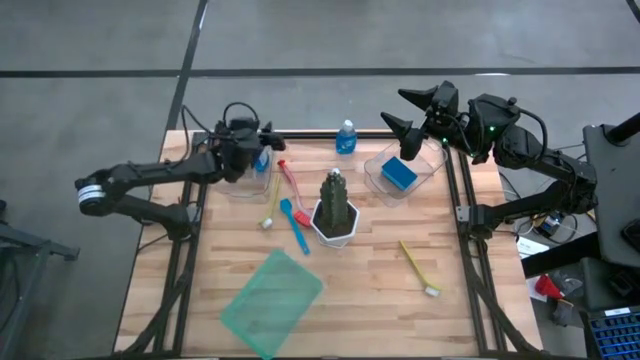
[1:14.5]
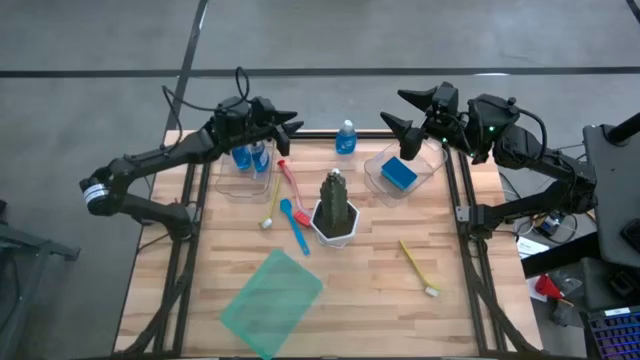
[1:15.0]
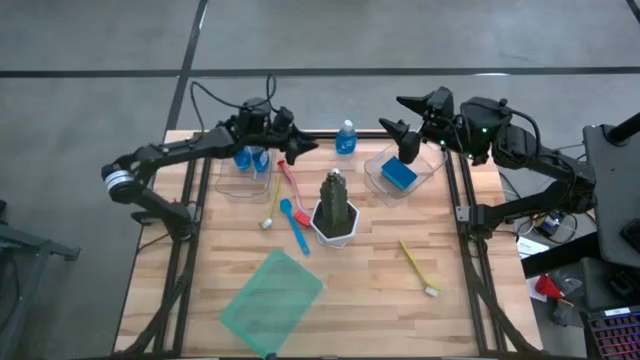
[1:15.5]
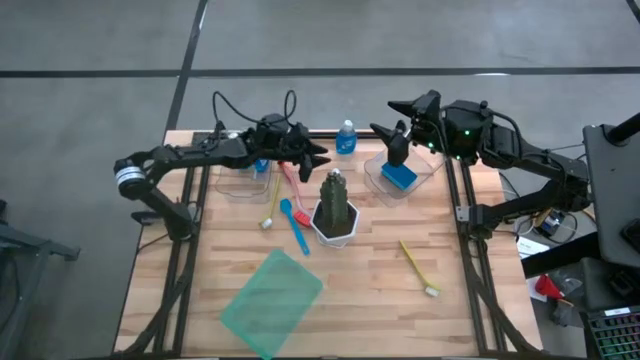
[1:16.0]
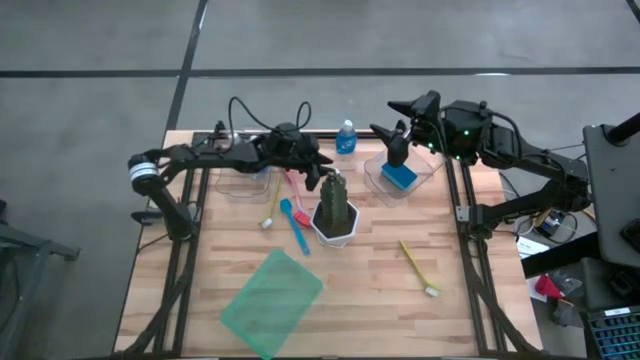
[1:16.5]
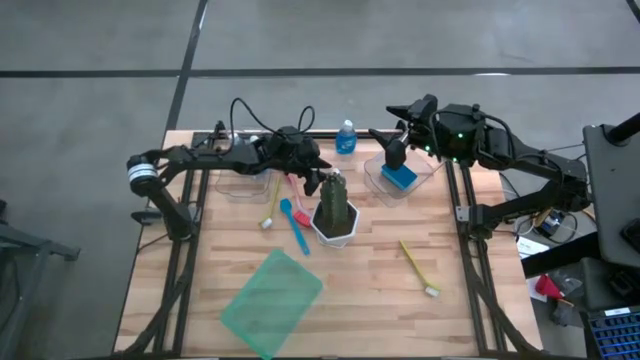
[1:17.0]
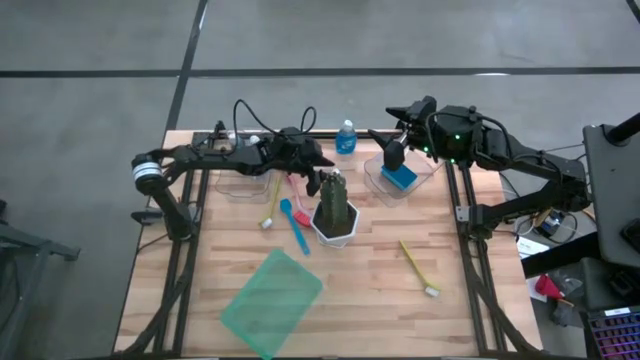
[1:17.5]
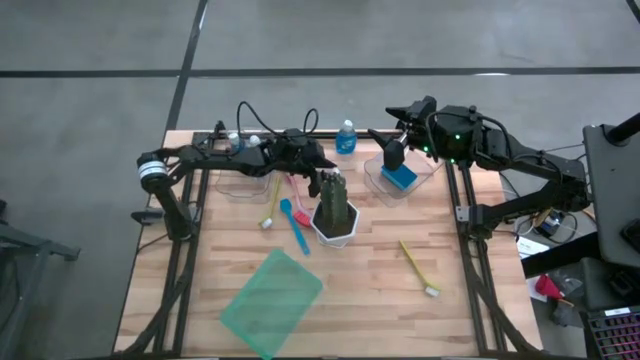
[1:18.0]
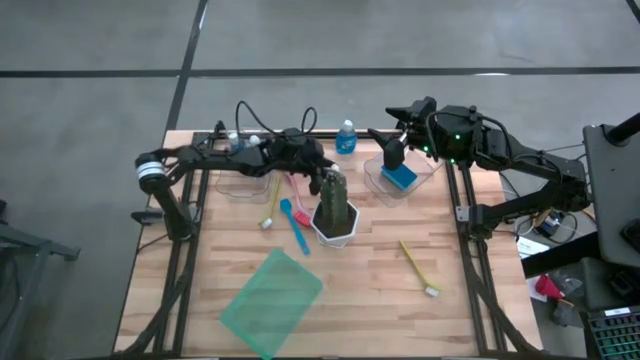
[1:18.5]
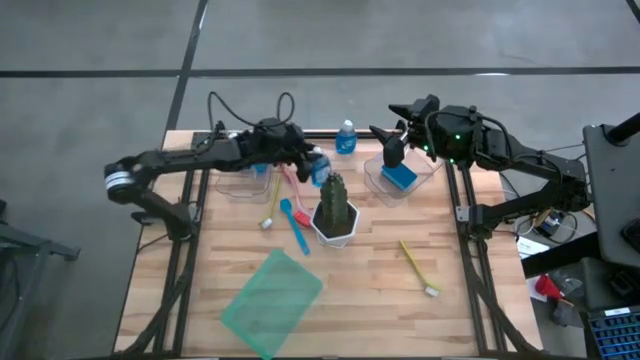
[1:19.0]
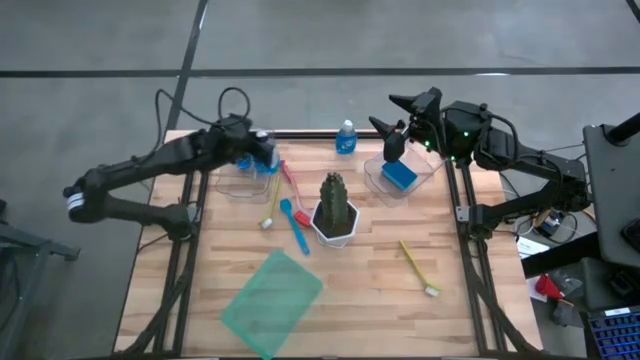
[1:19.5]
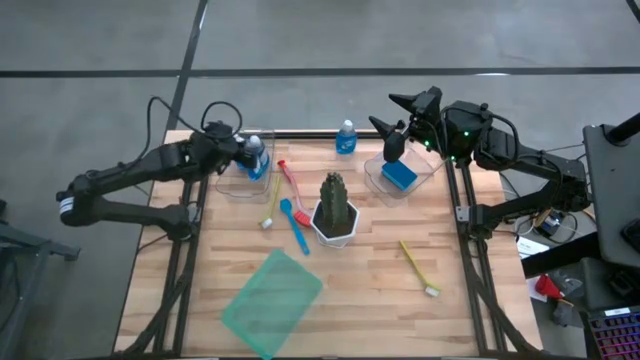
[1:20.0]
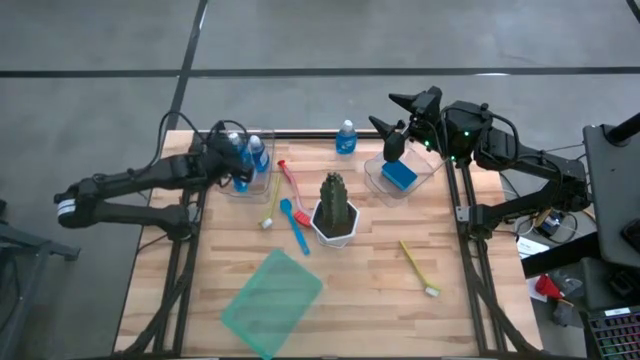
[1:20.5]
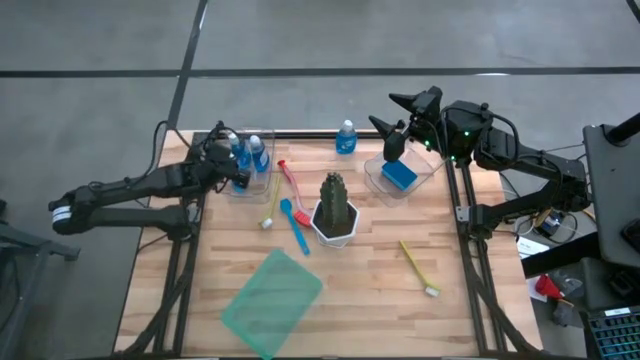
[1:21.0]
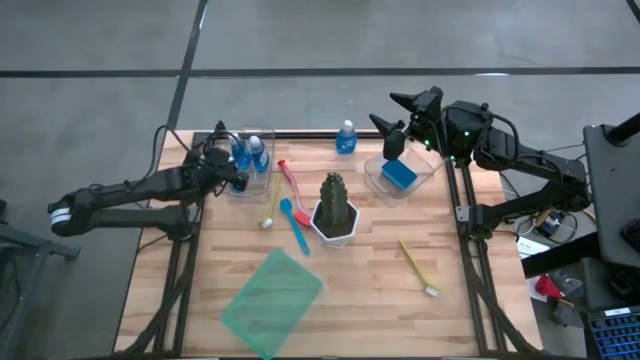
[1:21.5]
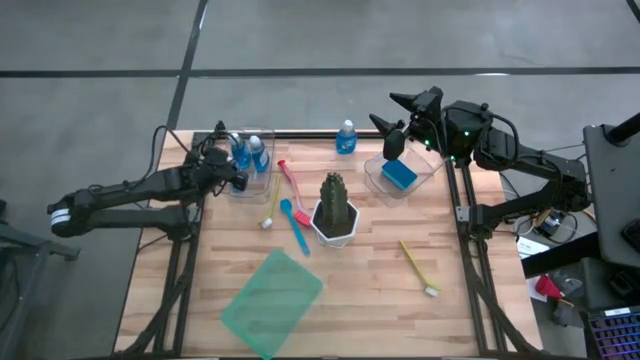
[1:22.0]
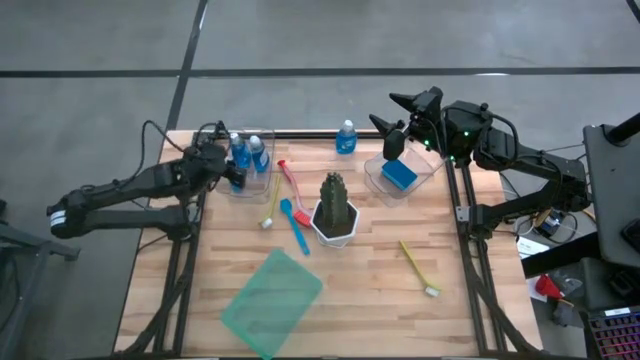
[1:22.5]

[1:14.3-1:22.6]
Task: Pick & Place Kitchen Sink Supplies
Put the blue liquid detergent into the left transparent bin

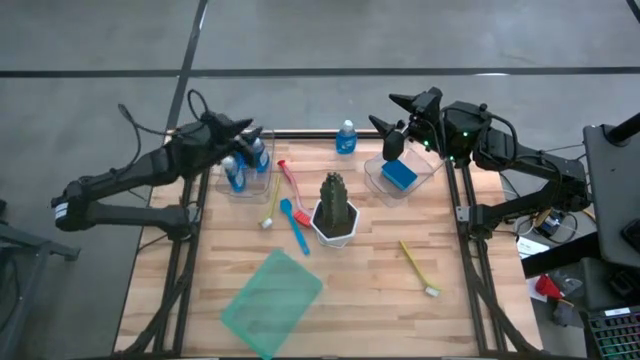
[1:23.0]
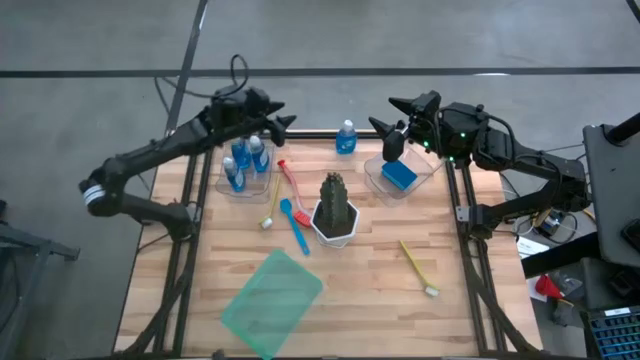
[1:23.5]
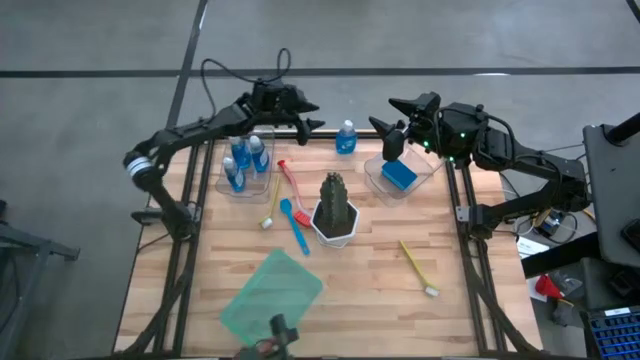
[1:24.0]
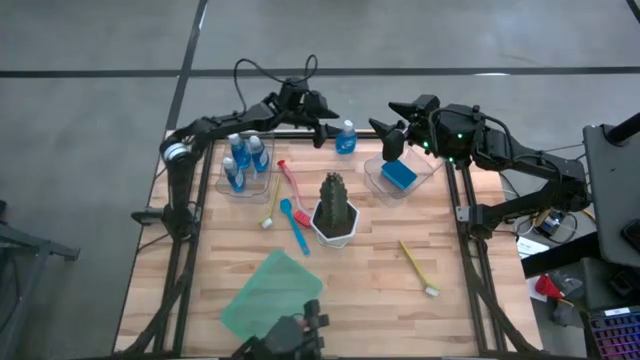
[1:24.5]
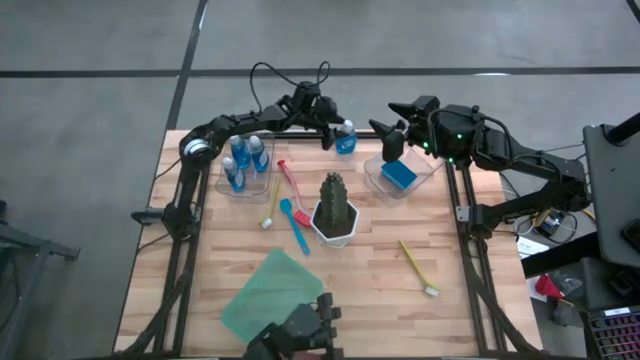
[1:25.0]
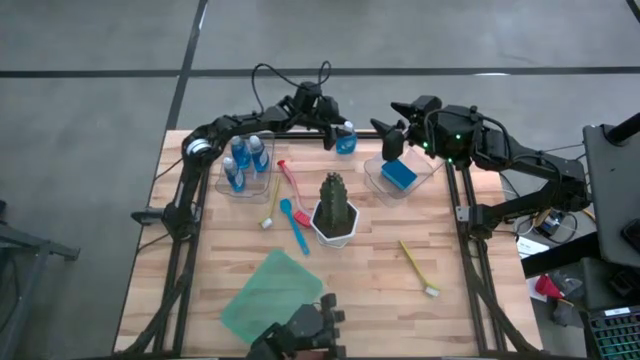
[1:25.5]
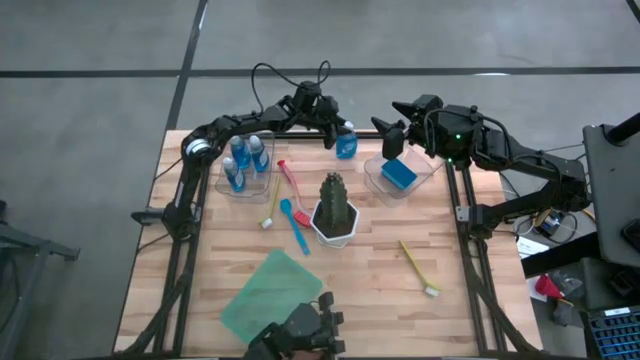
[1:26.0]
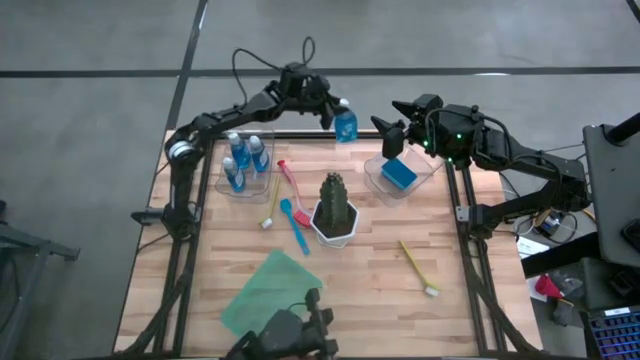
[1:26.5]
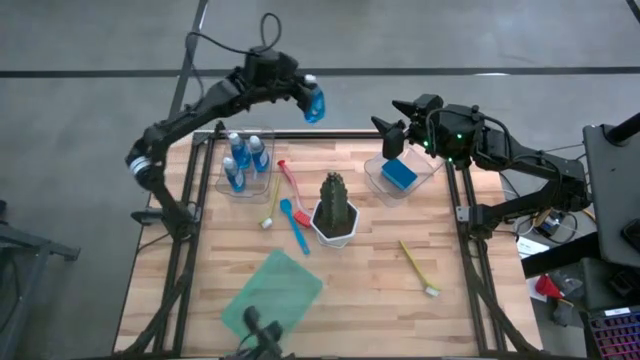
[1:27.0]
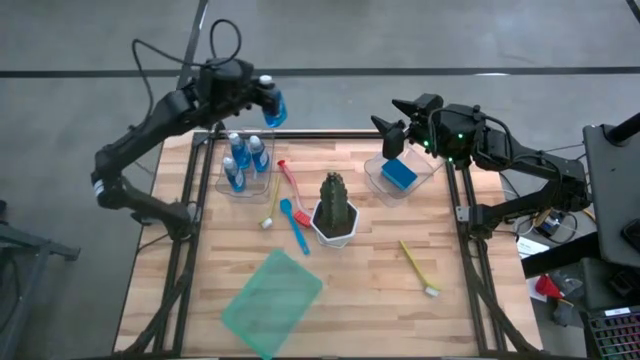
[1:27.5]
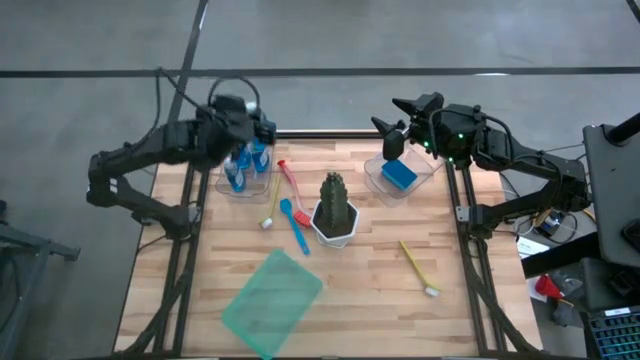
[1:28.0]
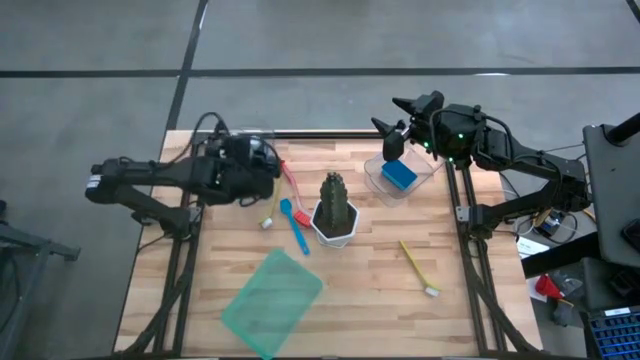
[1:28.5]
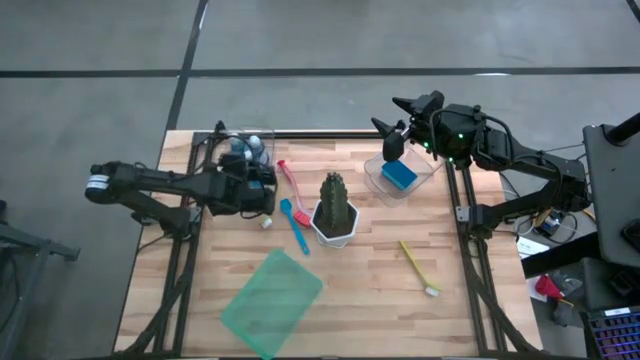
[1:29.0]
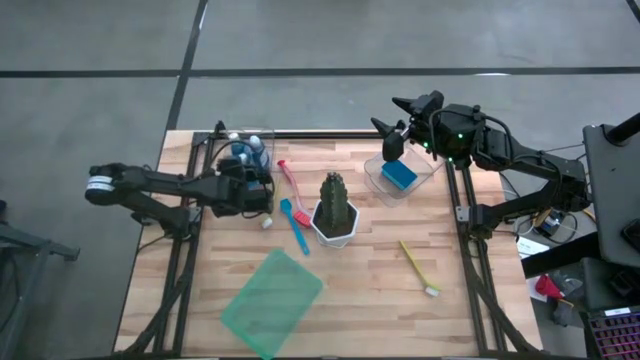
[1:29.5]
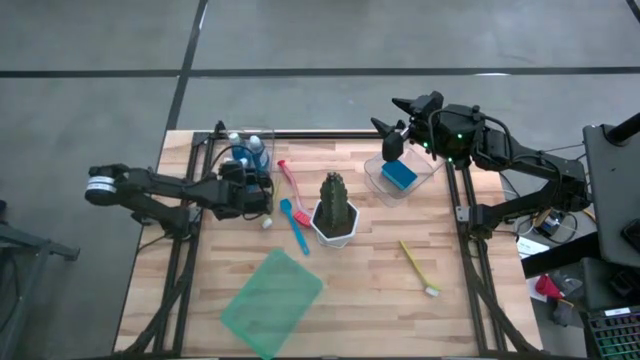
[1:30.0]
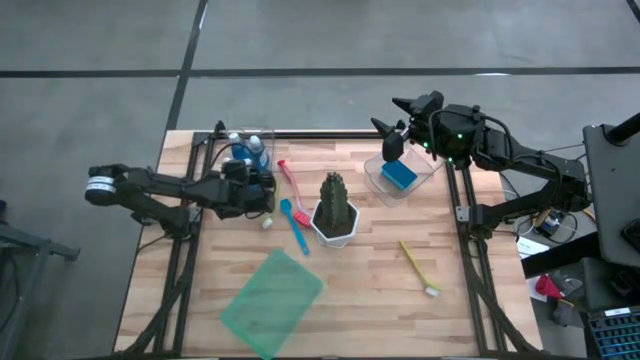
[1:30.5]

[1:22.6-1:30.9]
Put the blue liquid detergent into the left transparent bin

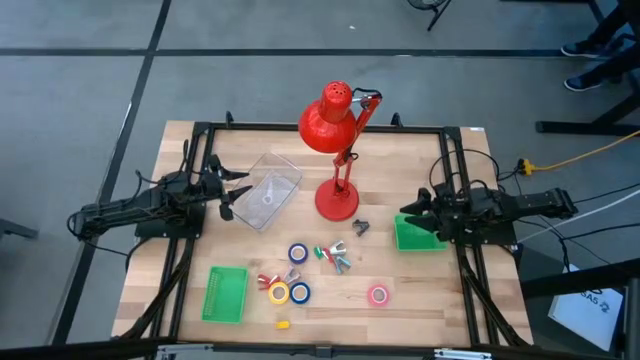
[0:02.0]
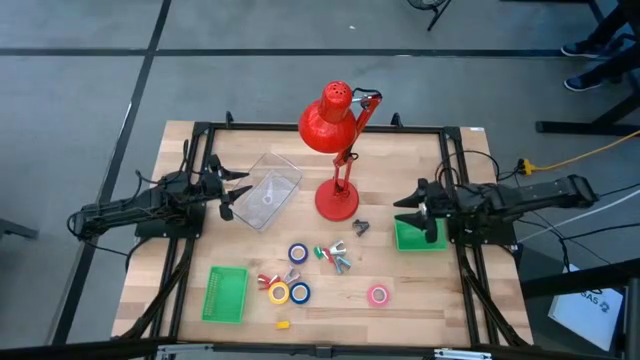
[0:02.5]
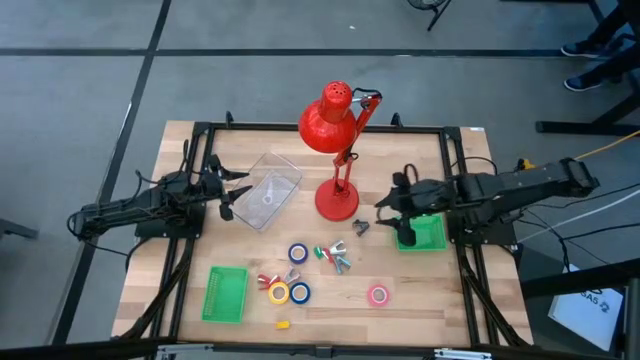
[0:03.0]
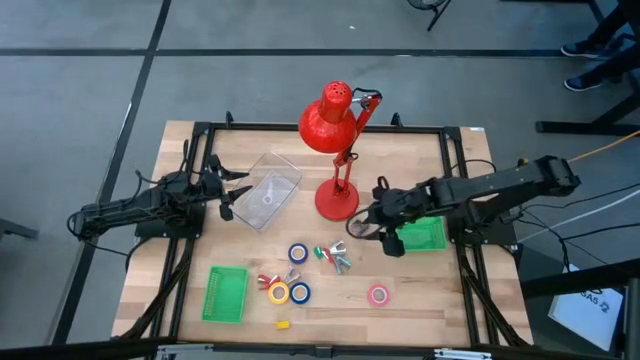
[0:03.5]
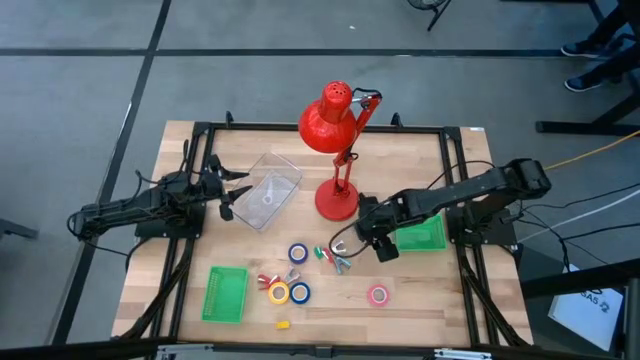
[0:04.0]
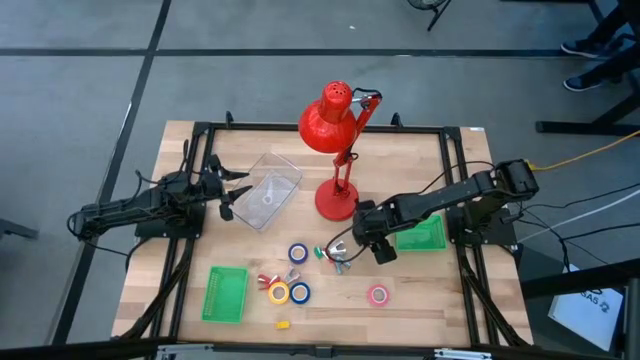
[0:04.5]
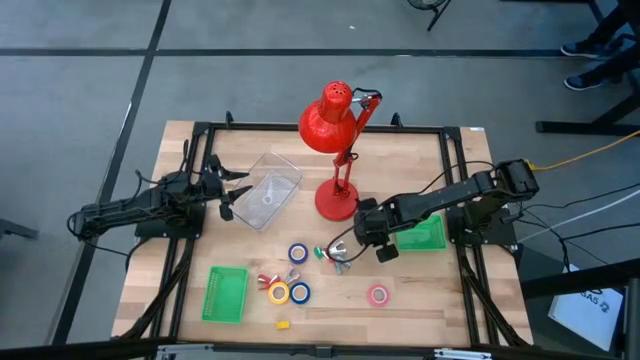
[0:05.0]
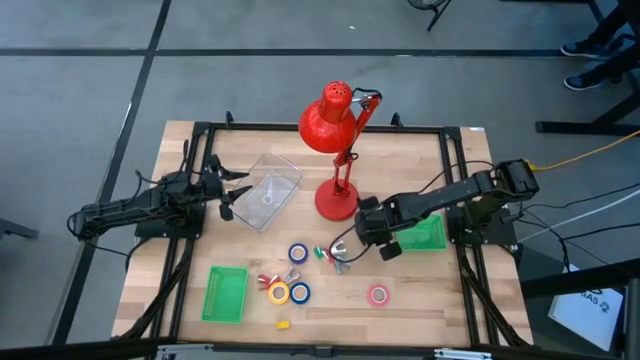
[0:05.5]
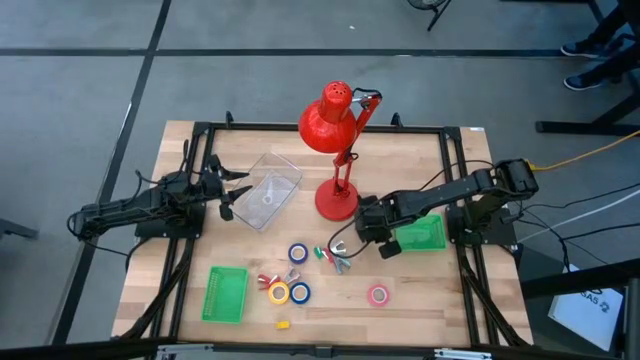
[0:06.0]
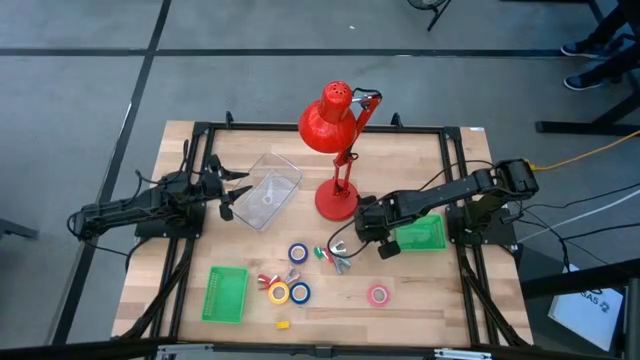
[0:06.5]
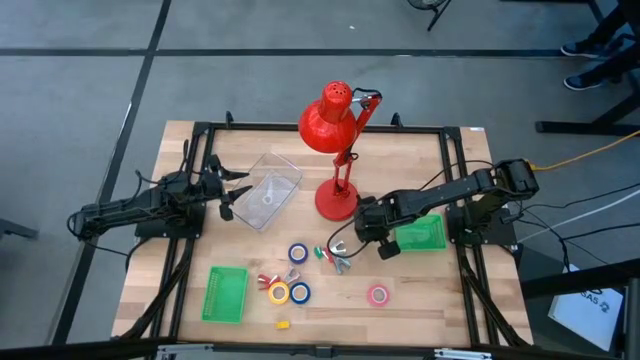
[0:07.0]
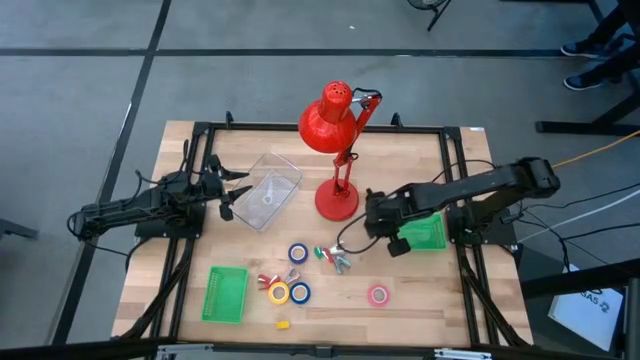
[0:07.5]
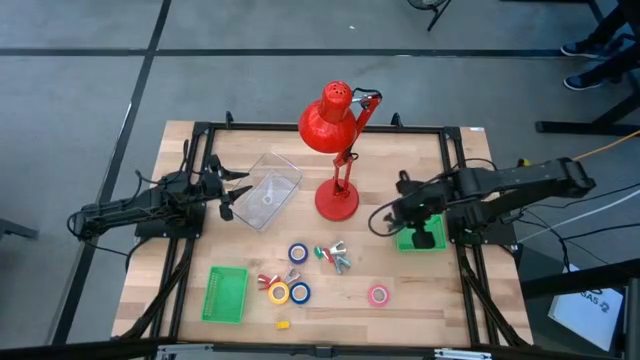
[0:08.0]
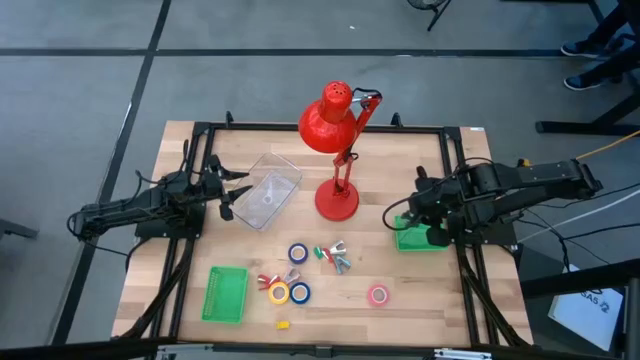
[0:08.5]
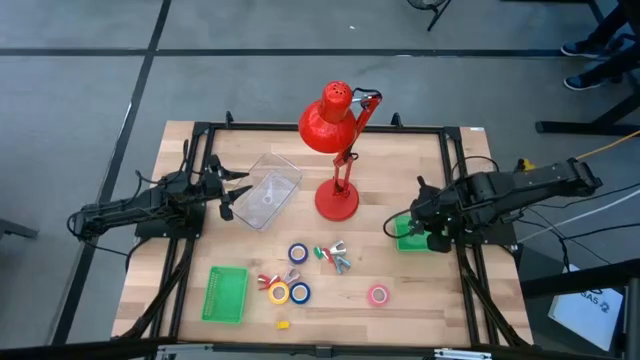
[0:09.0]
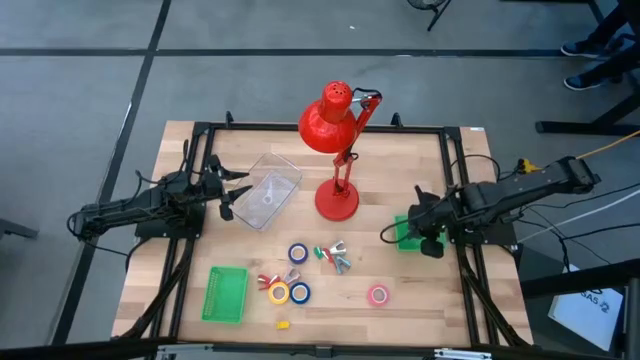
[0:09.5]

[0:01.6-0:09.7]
Task: Pick and place Stapler, Stapler remover, tape
Put the black staple remover into the top green basket
